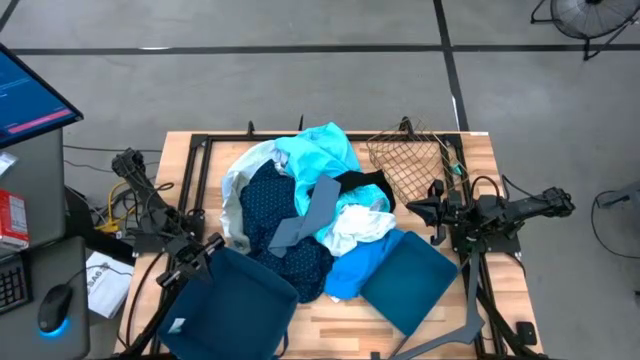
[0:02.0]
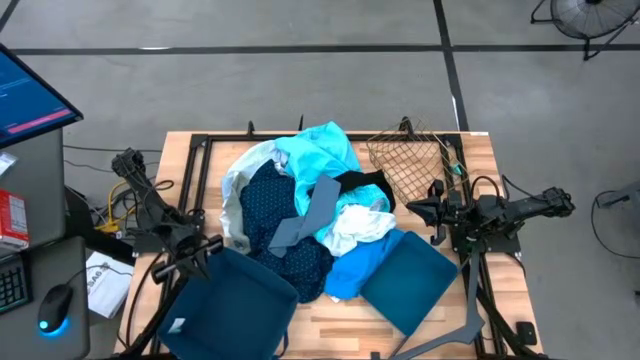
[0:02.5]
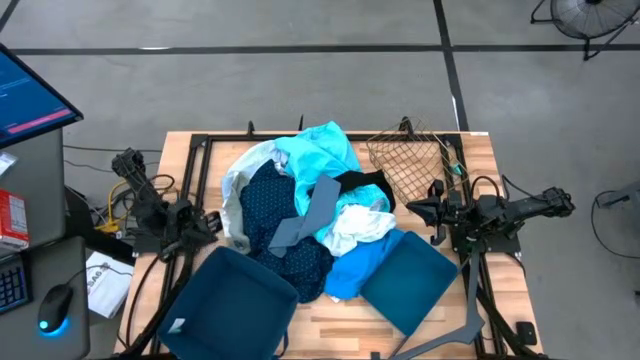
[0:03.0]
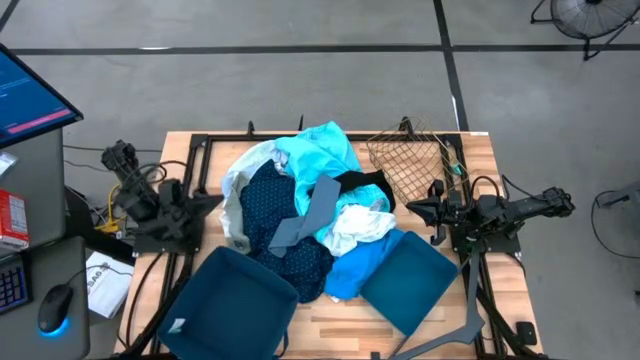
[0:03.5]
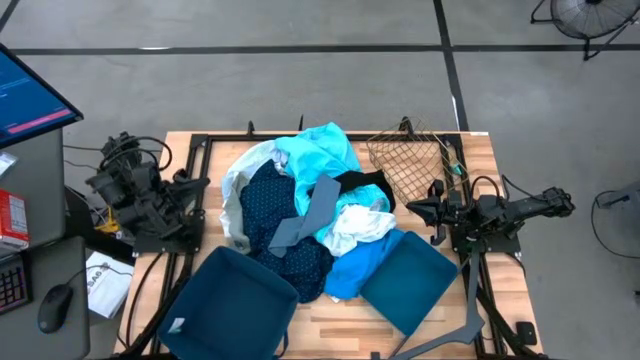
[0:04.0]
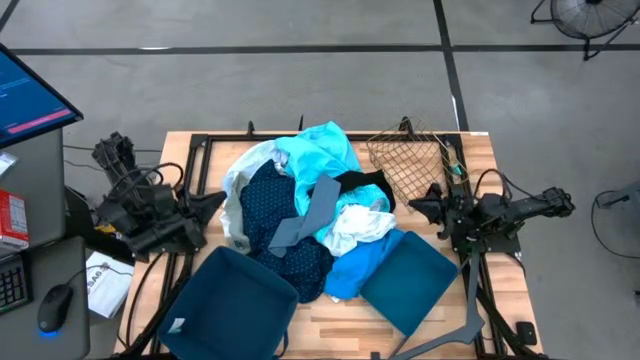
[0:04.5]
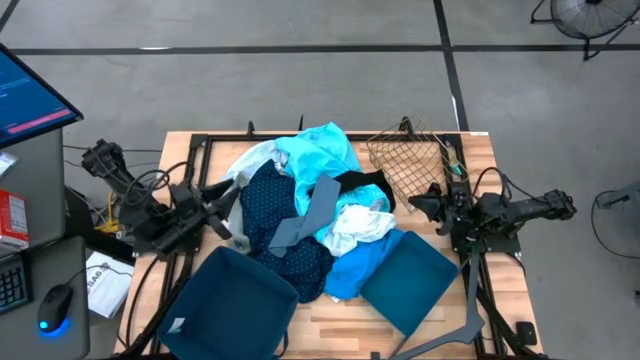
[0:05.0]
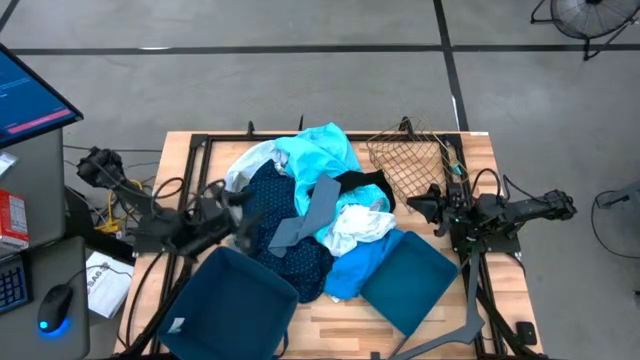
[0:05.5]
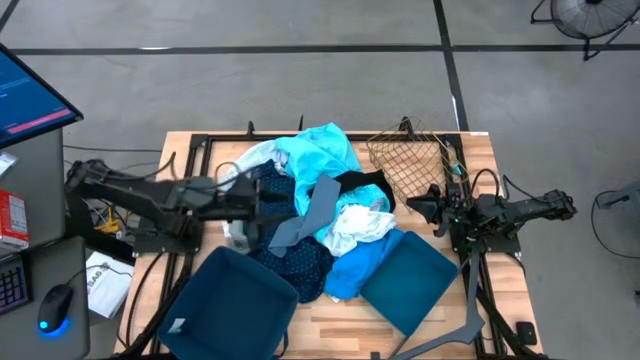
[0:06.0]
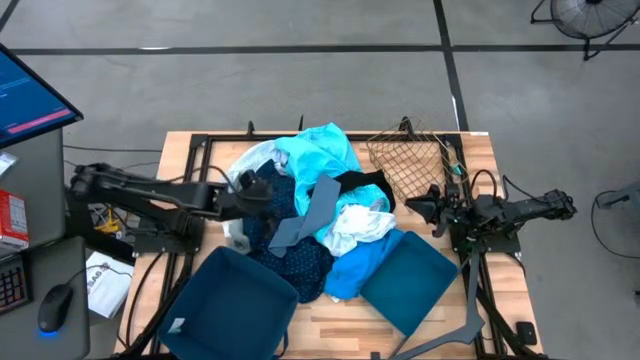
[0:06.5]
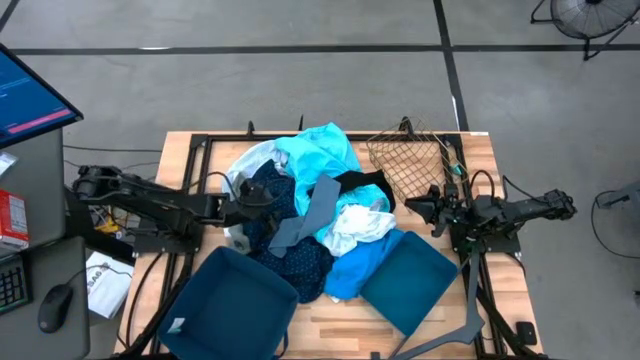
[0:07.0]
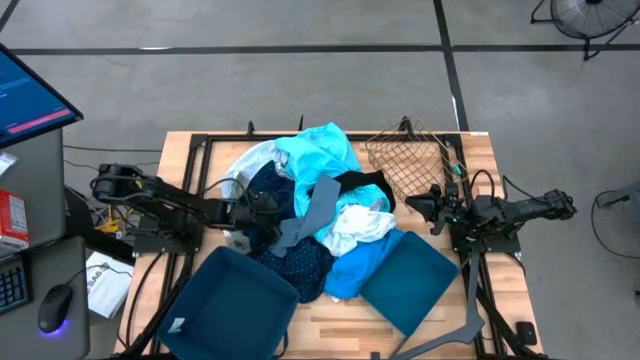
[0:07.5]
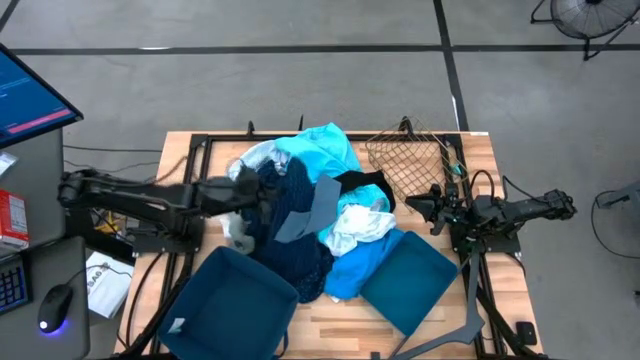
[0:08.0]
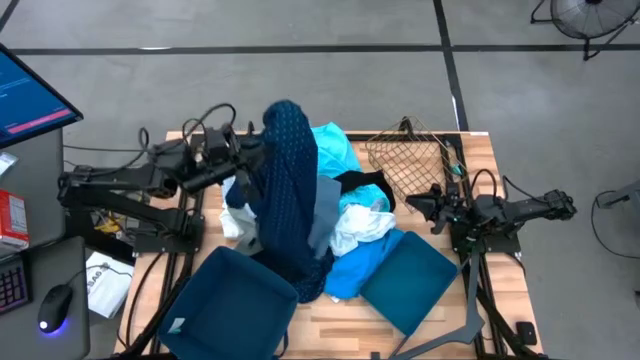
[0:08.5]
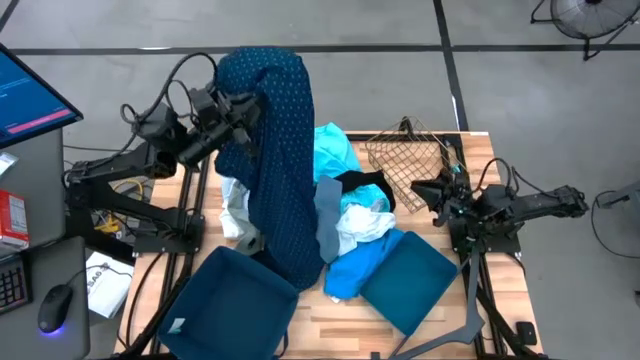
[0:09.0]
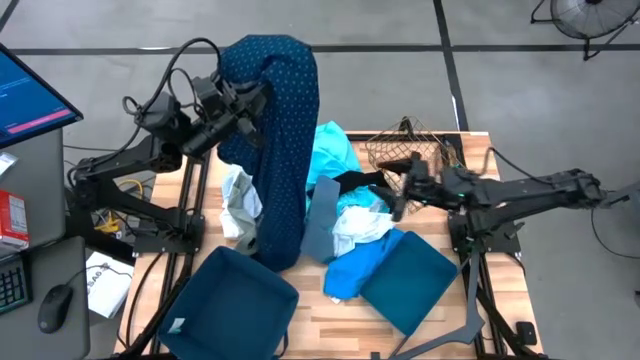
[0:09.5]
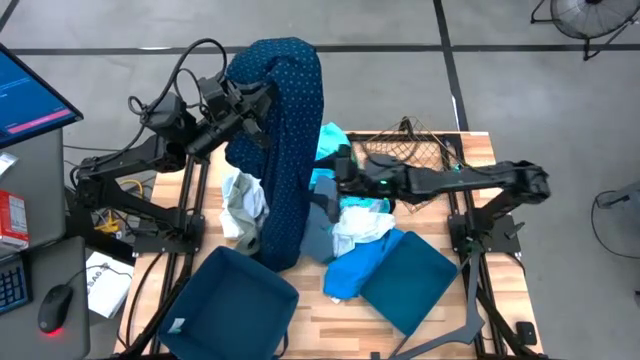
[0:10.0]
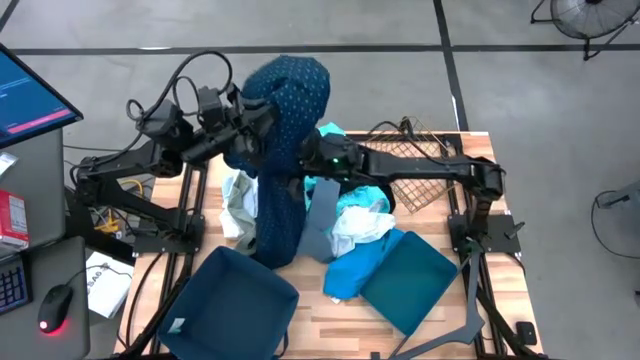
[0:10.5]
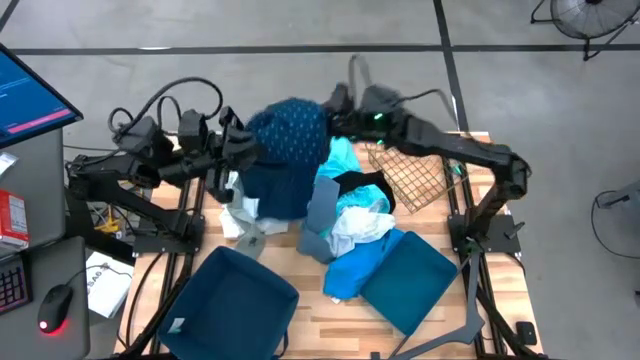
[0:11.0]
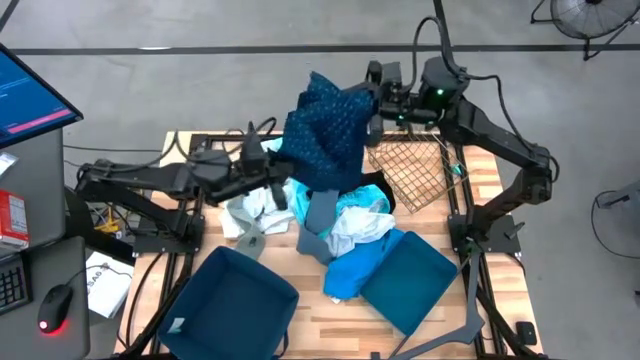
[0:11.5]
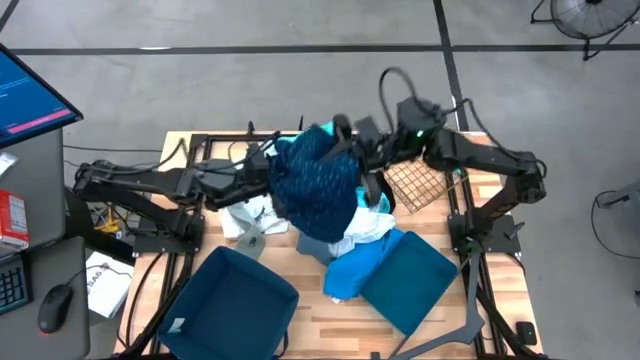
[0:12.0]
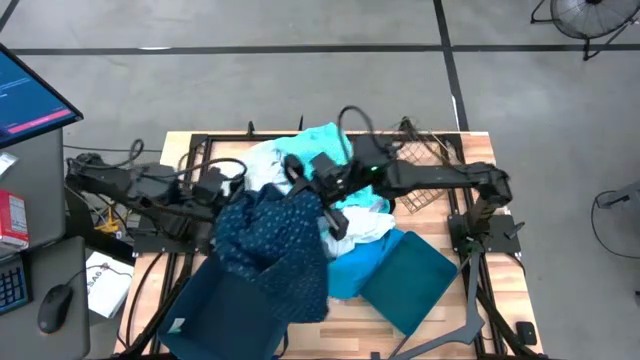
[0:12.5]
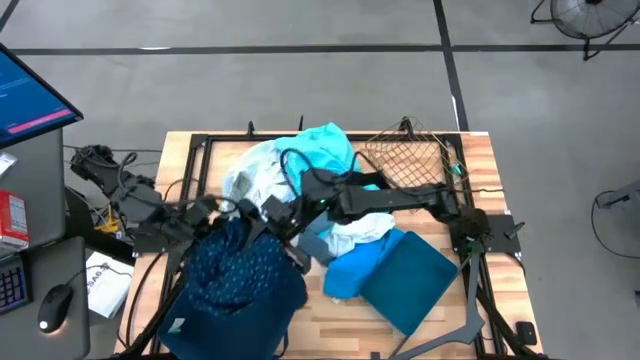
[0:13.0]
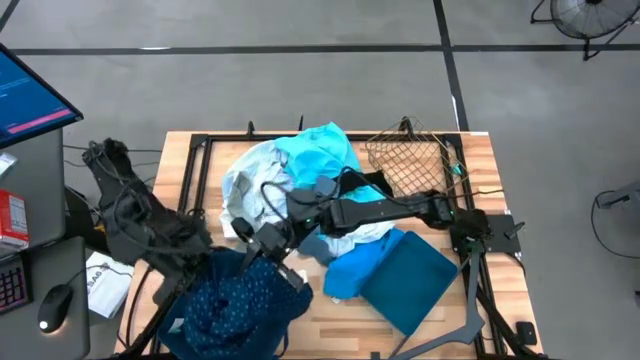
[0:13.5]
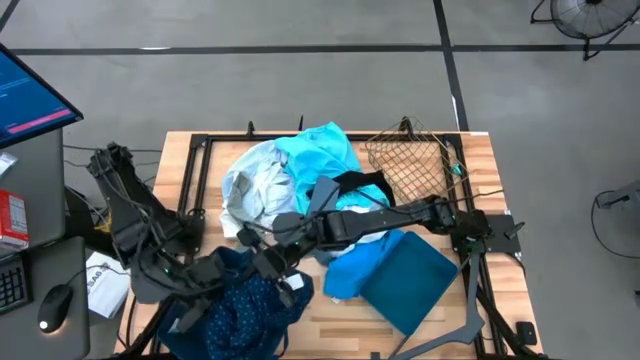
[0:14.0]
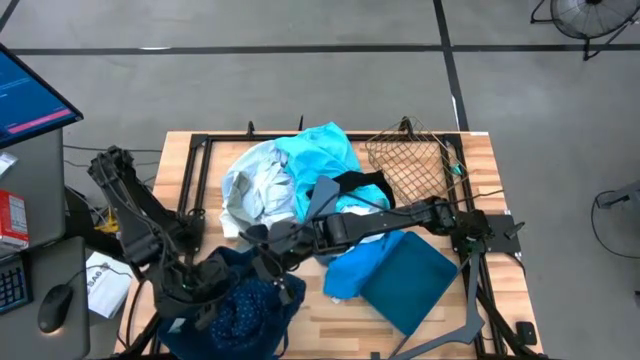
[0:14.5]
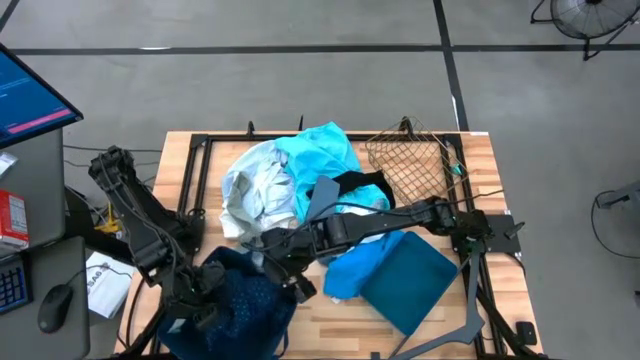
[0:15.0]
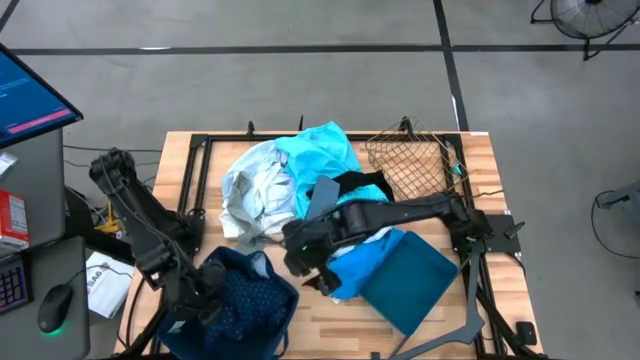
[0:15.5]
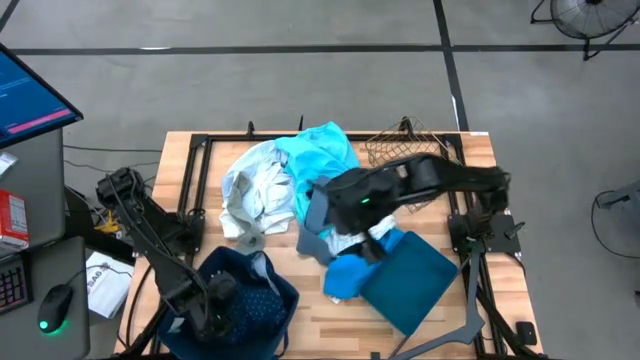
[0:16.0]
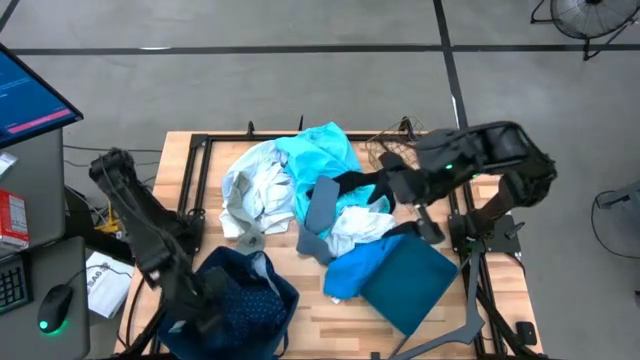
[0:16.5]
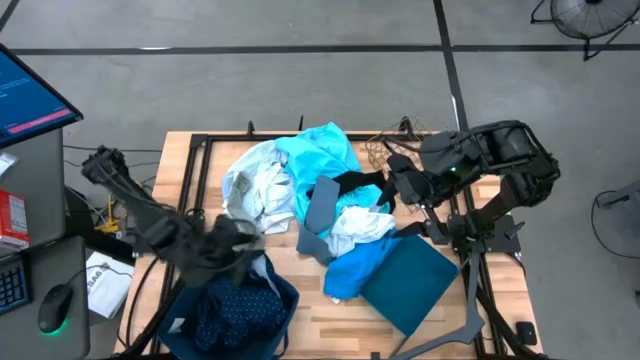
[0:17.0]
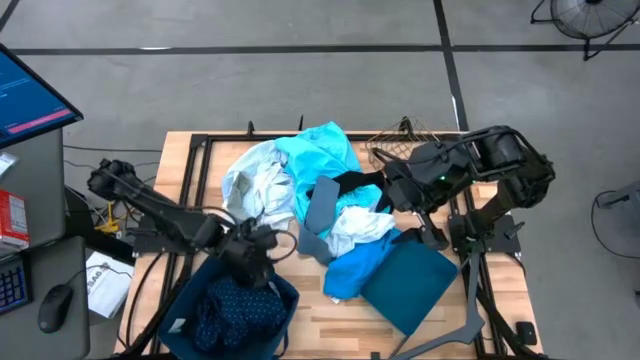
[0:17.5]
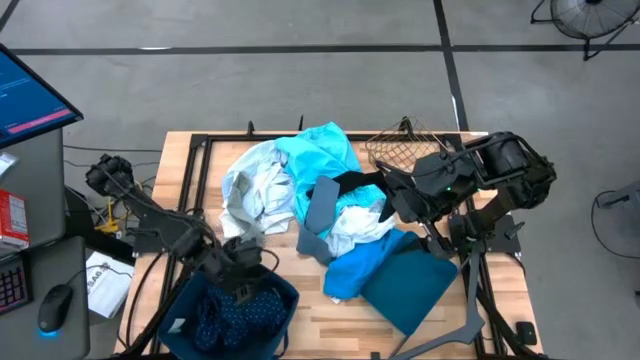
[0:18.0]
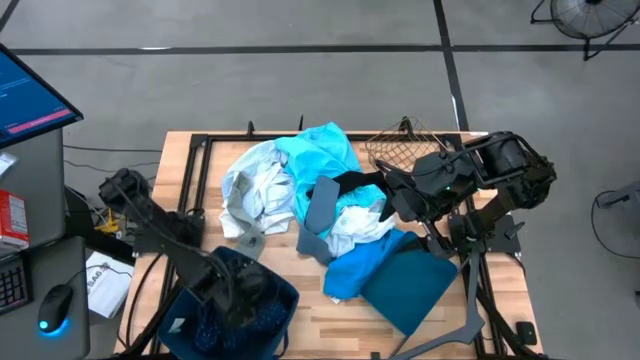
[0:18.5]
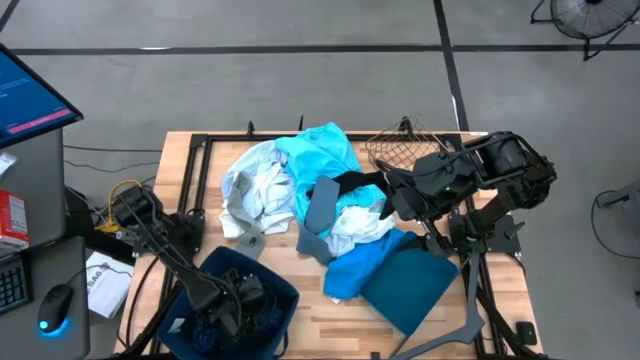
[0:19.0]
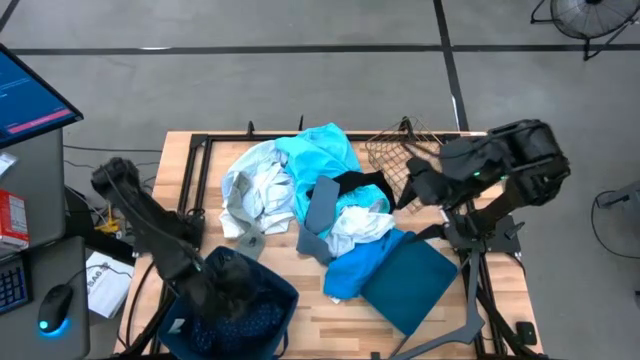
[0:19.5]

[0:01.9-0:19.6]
Task: Pick & Place Cloths
Put the blue shirt into the laundry organizer
